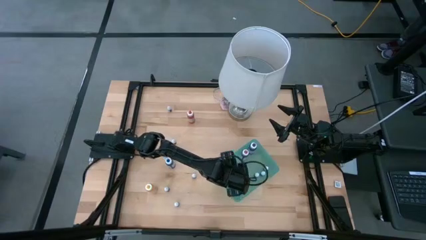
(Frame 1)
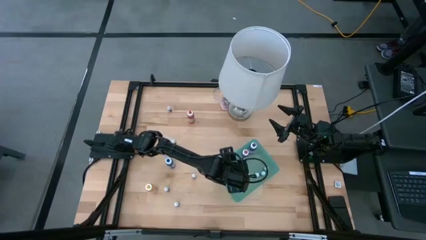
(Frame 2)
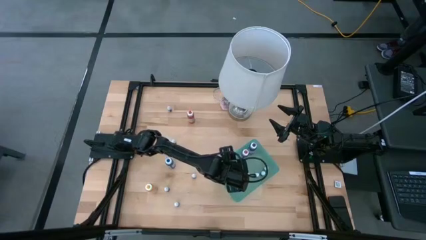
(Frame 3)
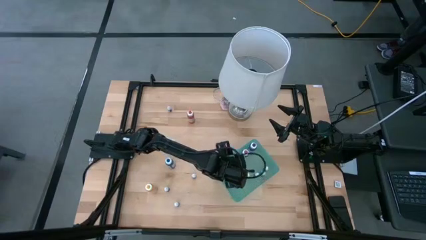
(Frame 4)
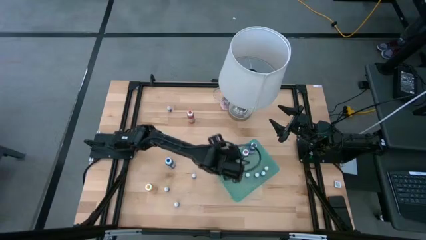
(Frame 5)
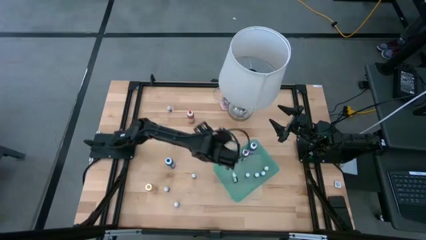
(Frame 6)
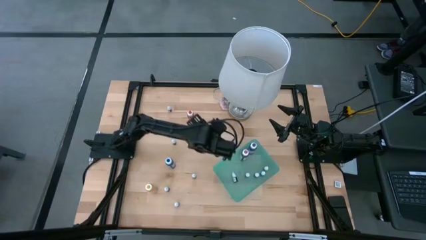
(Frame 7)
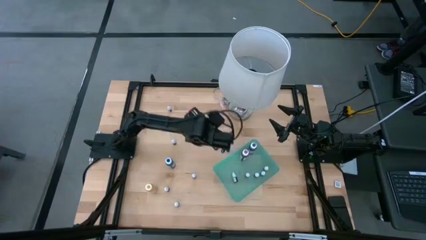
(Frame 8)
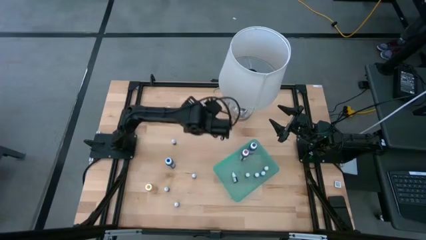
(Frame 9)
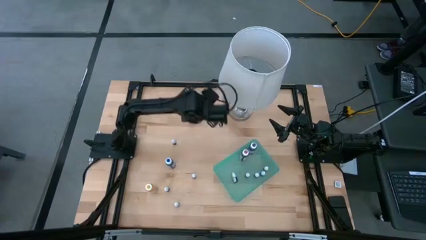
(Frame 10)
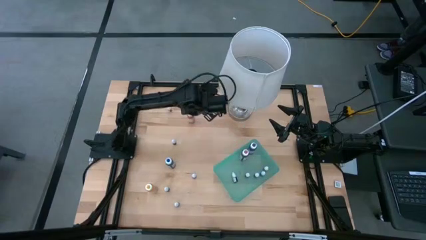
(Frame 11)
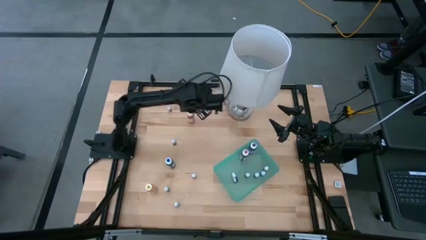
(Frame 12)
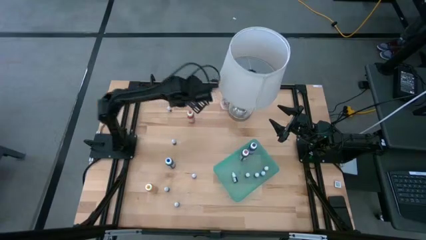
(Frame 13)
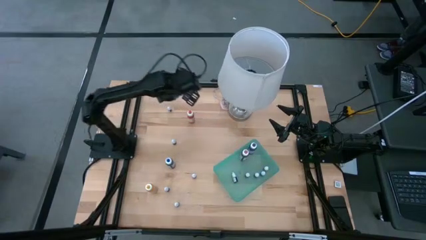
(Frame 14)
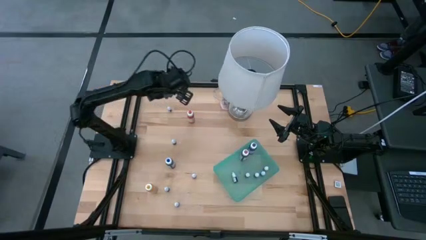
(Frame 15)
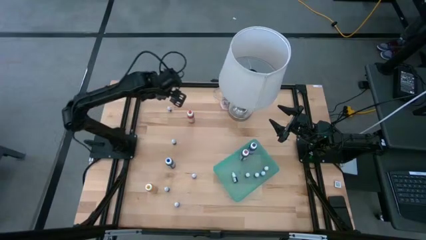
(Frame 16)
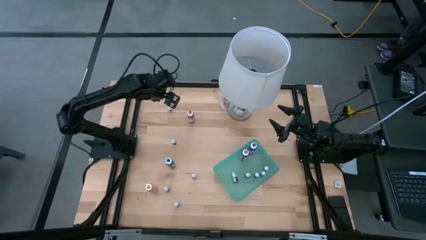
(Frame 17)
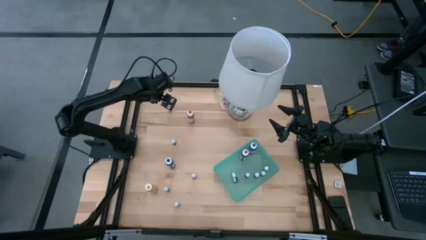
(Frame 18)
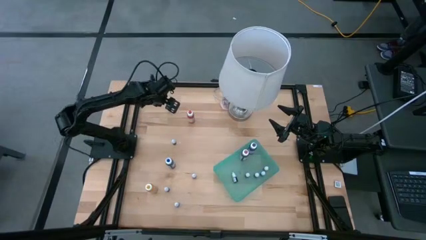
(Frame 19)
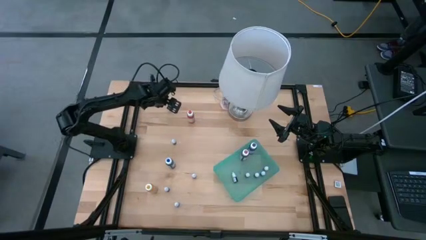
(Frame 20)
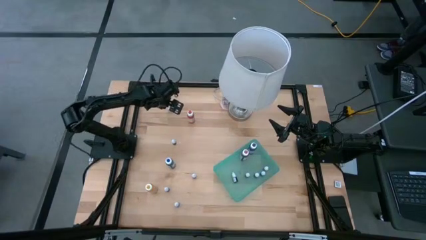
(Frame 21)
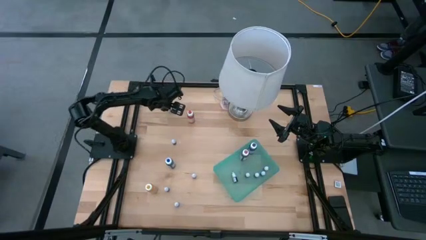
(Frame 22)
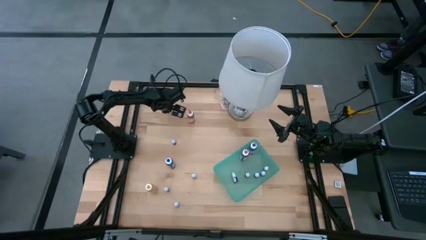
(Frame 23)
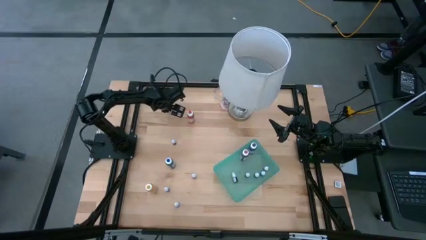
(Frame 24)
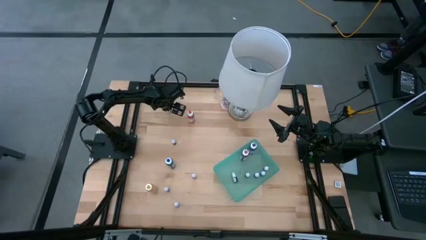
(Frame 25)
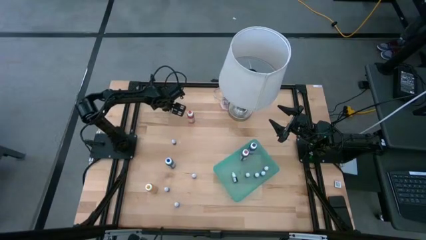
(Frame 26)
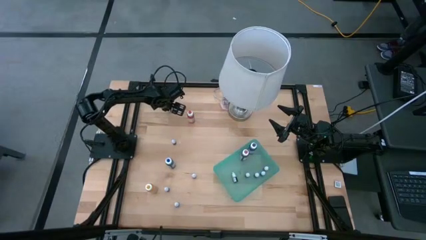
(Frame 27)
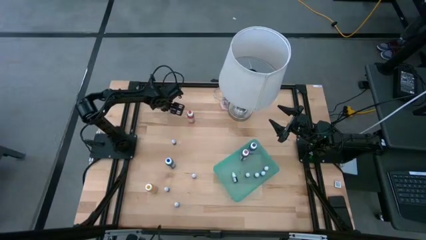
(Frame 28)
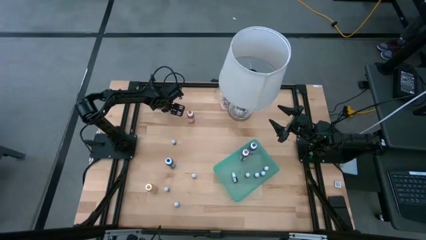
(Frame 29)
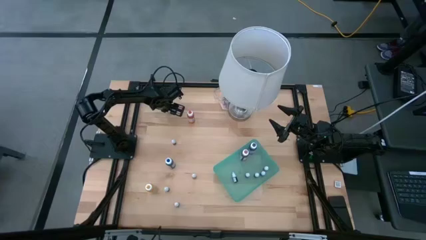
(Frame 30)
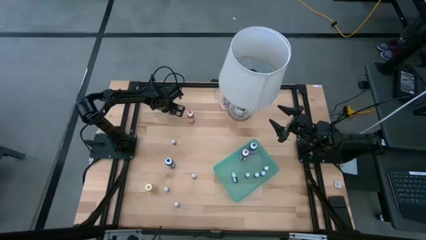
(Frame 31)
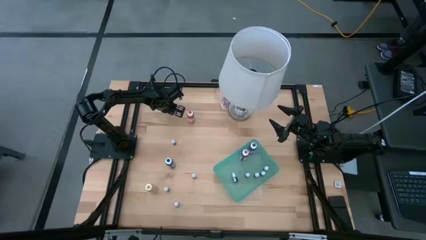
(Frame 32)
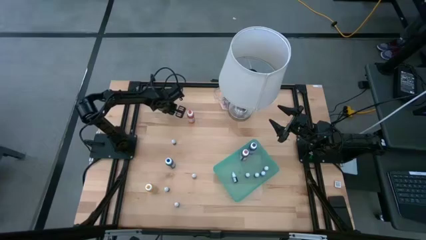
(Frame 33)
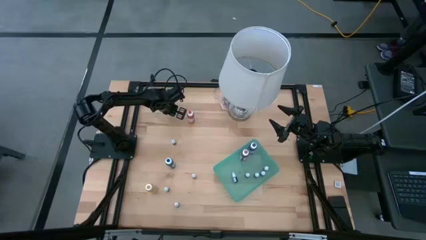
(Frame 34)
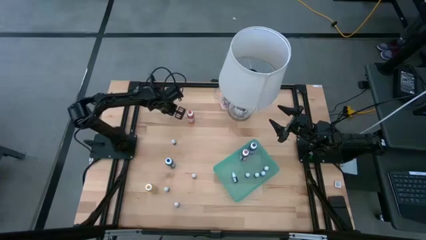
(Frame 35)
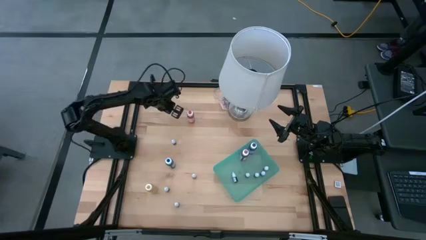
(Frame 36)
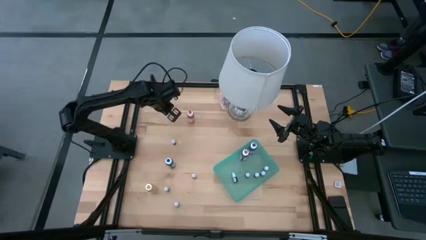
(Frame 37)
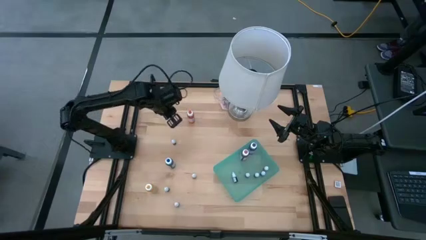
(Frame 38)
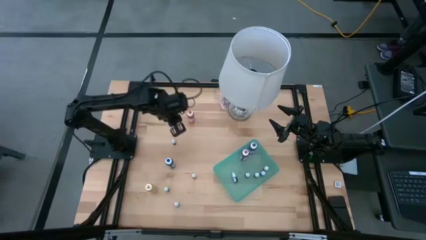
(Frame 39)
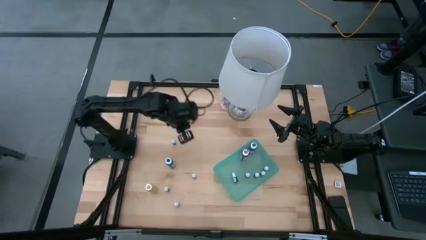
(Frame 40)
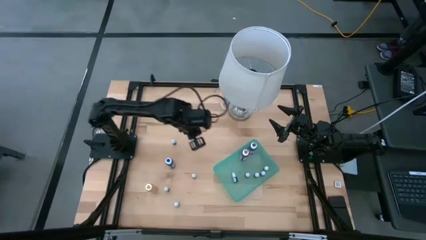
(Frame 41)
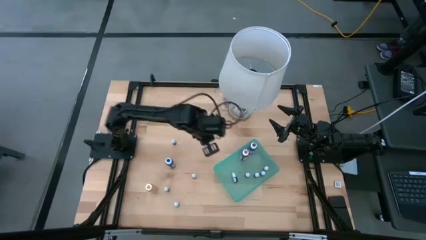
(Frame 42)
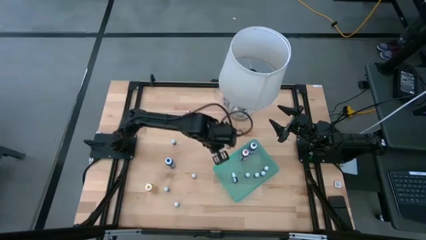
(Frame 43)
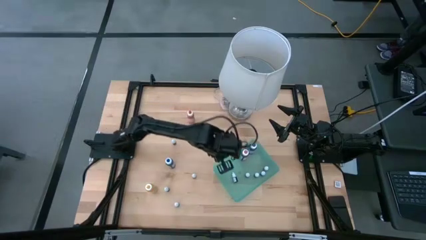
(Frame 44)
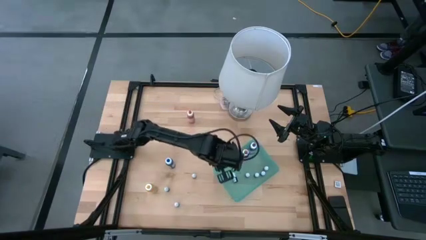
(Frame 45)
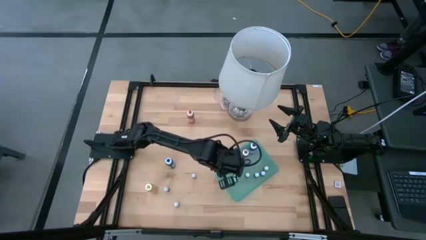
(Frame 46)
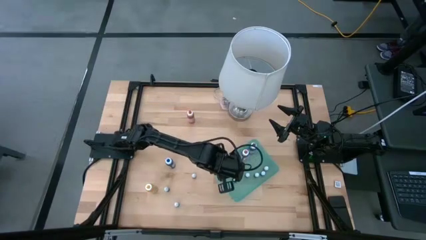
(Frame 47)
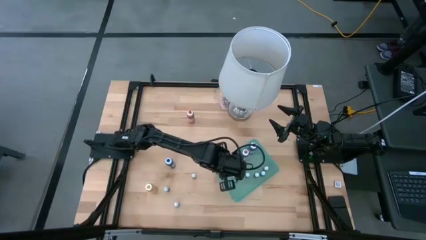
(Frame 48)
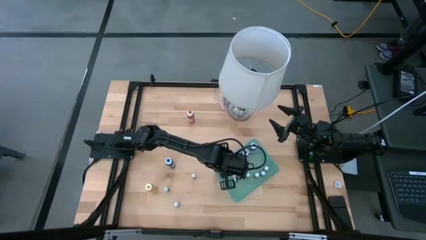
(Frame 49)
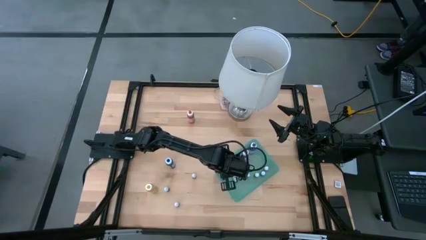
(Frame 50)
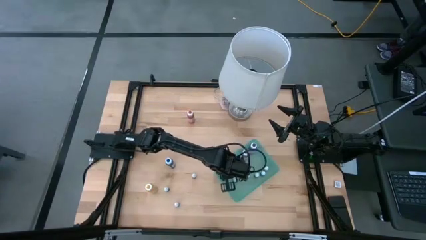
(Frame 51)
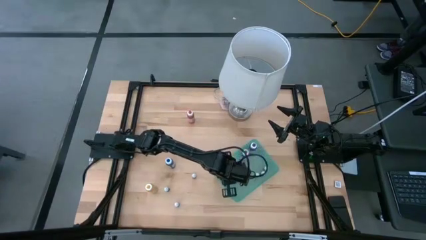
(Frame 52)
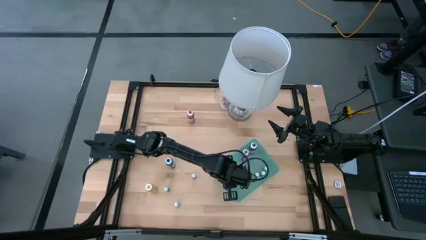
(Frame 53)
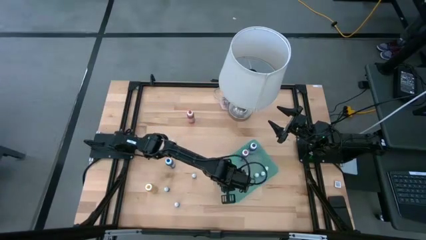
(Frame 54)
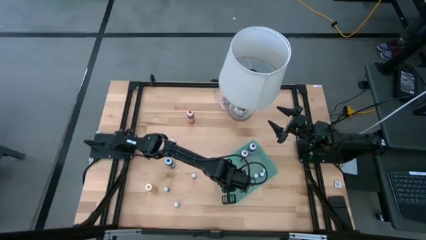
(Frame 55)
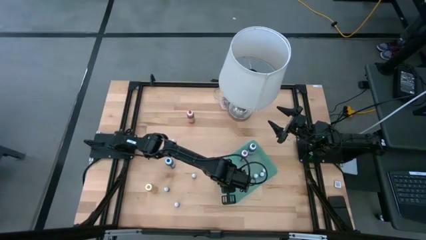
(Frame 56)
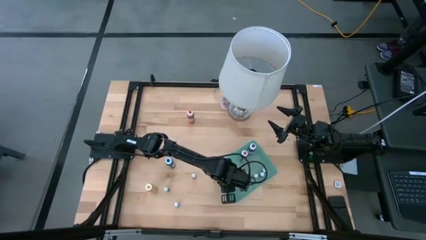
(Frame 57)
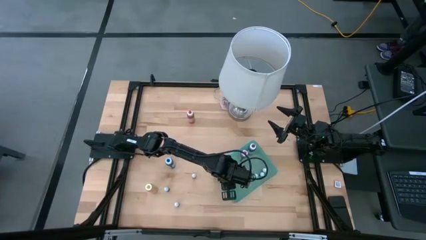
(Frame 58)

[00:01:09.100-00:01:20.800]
Task: Pick & Place food coloring
Put the small black food coloring bottle into the green bin
